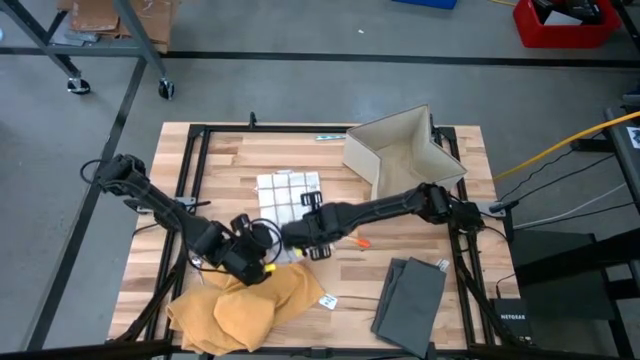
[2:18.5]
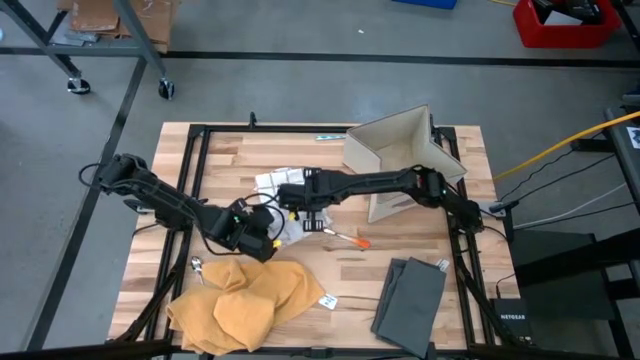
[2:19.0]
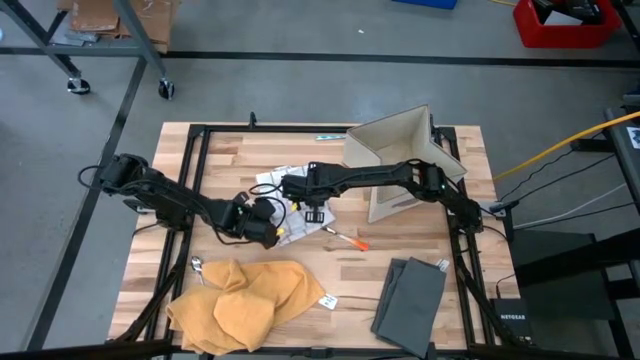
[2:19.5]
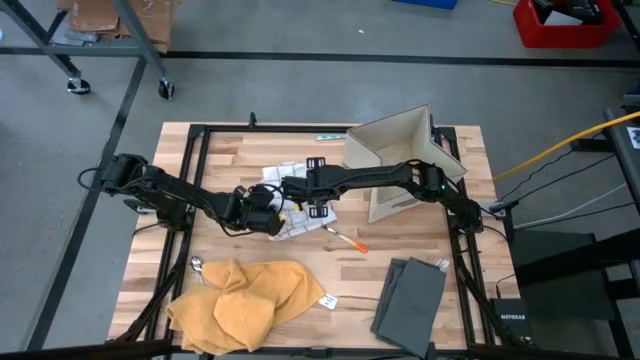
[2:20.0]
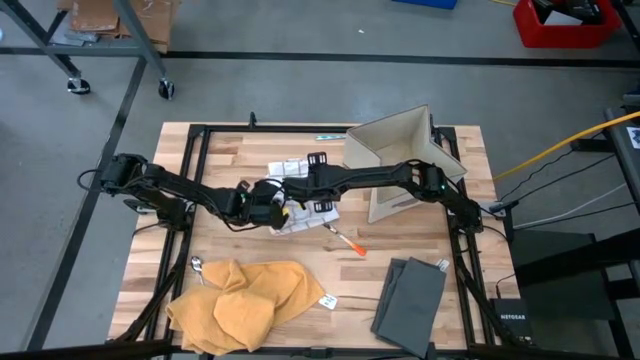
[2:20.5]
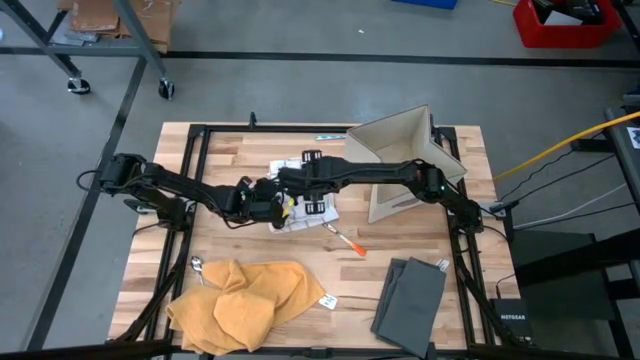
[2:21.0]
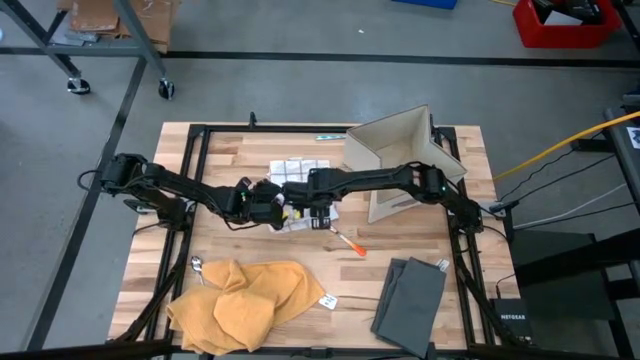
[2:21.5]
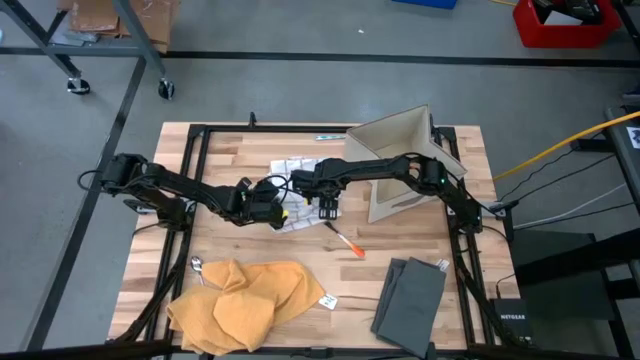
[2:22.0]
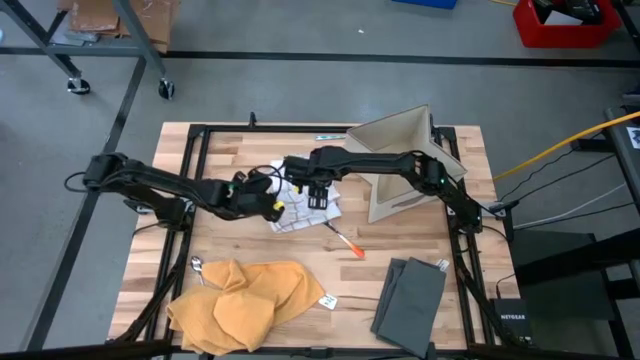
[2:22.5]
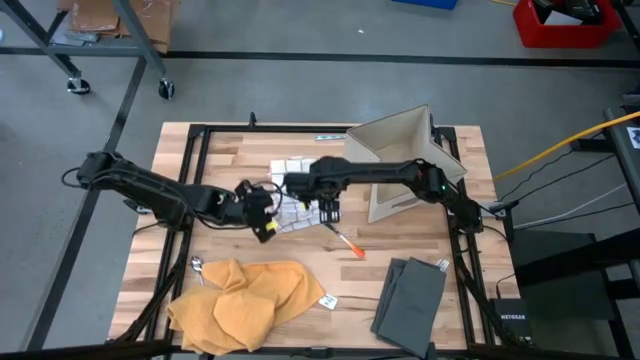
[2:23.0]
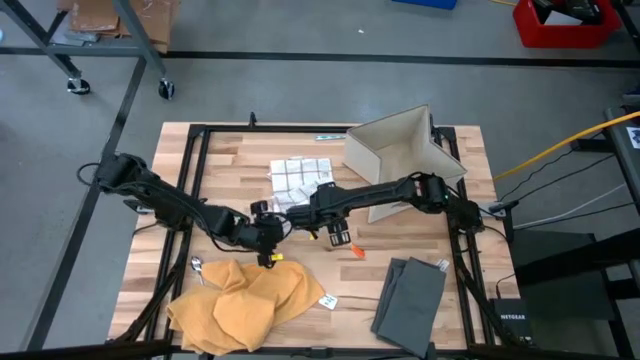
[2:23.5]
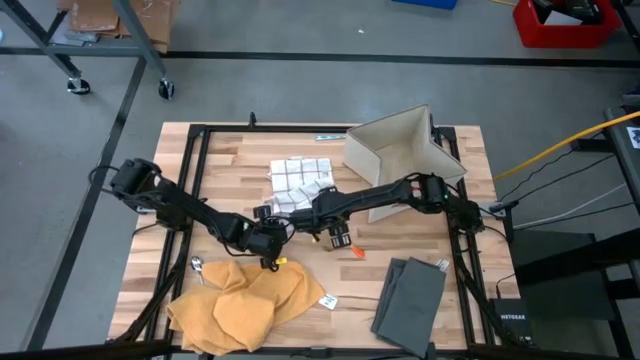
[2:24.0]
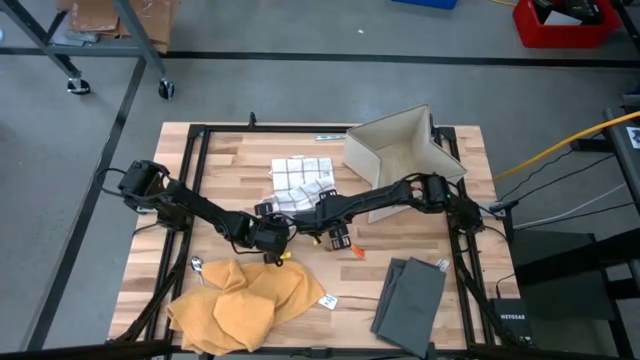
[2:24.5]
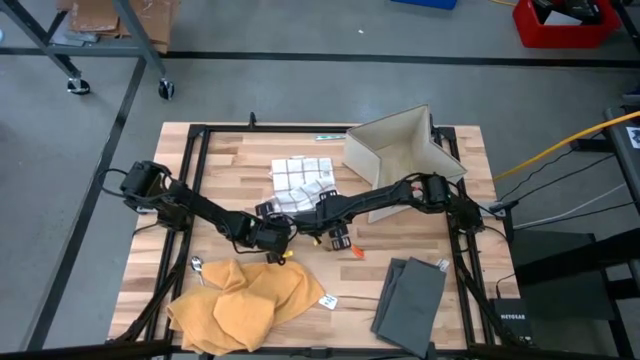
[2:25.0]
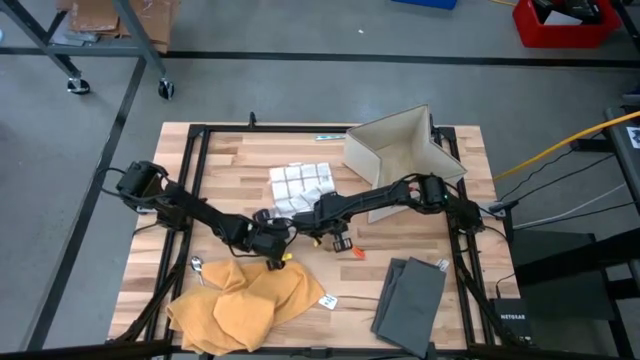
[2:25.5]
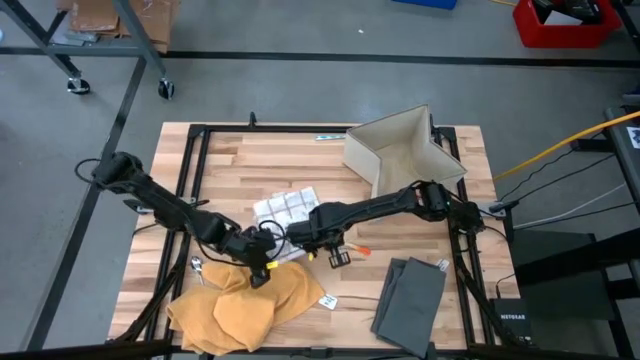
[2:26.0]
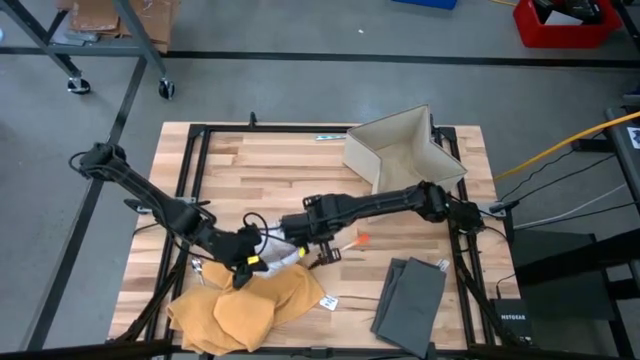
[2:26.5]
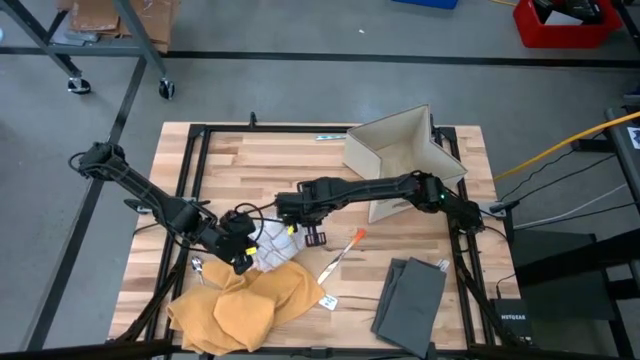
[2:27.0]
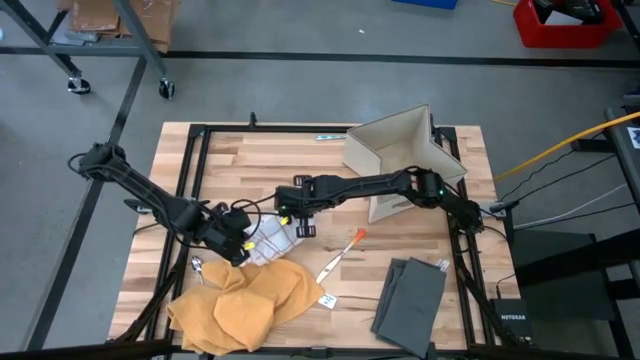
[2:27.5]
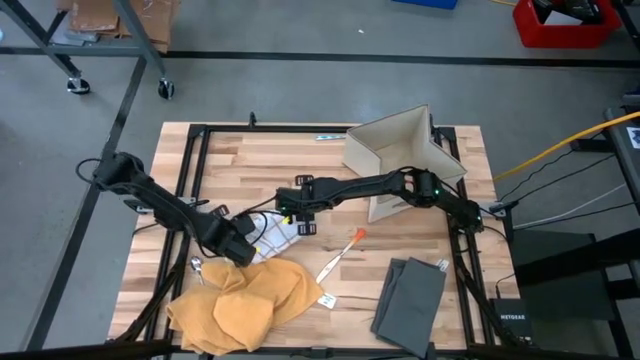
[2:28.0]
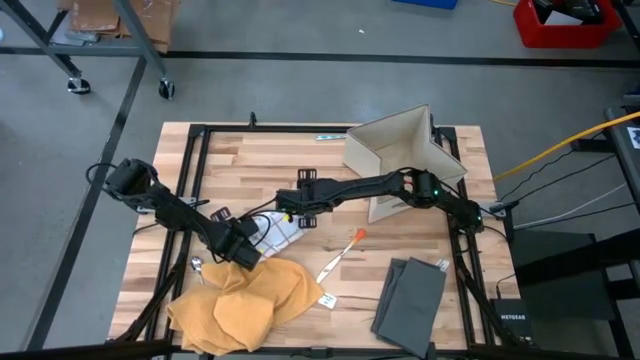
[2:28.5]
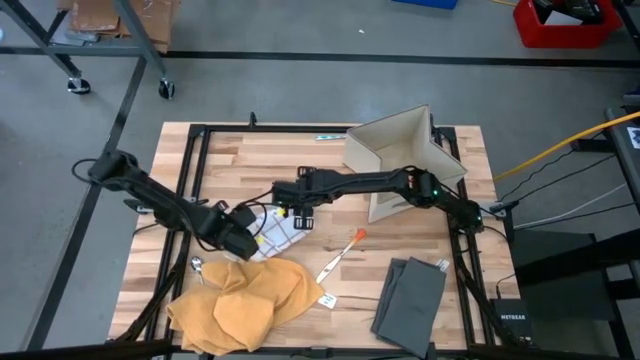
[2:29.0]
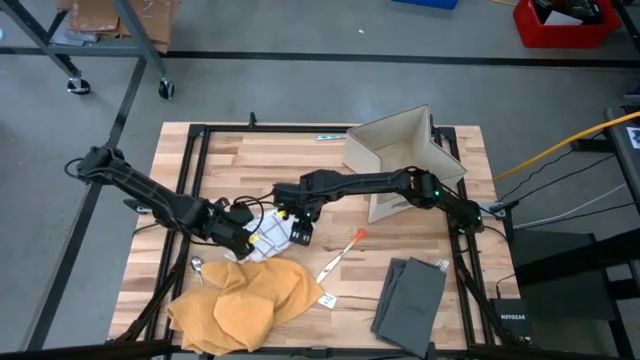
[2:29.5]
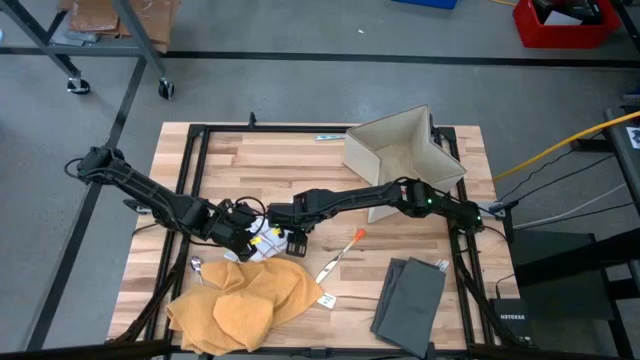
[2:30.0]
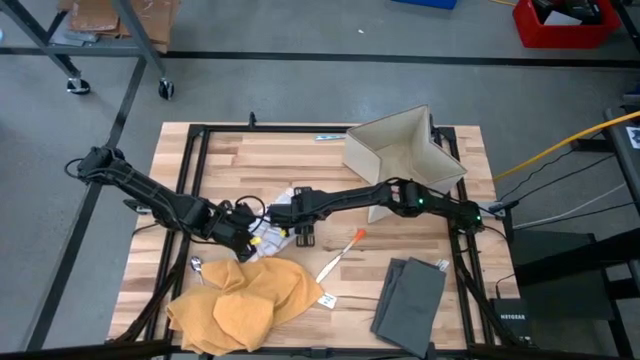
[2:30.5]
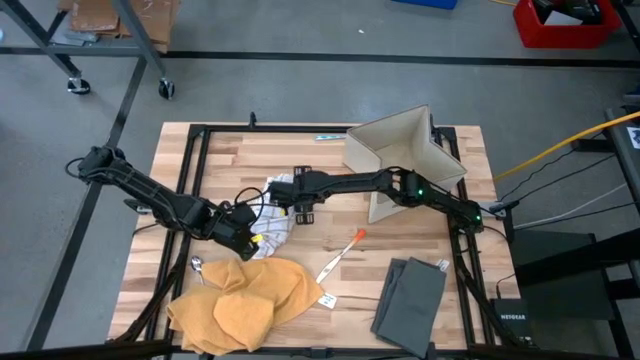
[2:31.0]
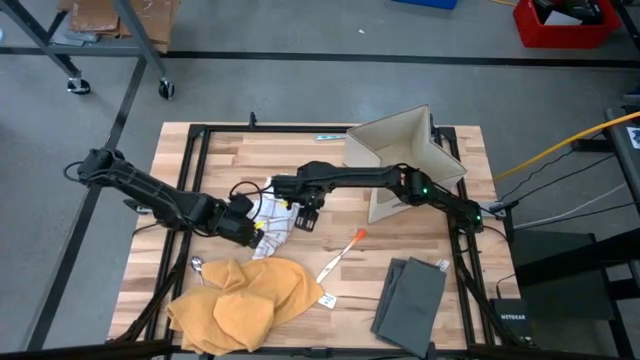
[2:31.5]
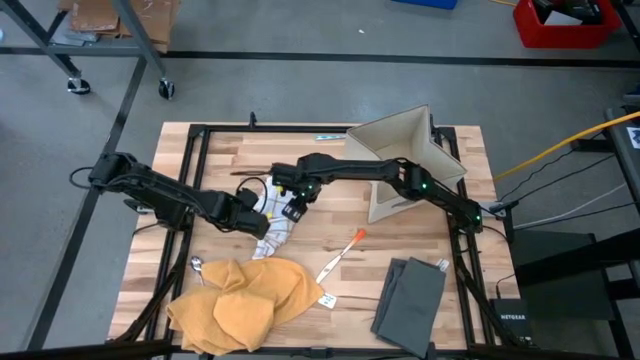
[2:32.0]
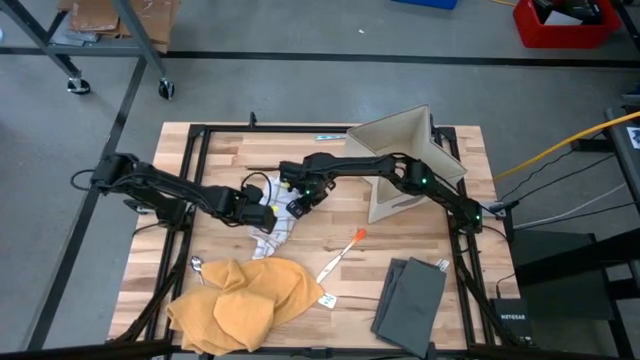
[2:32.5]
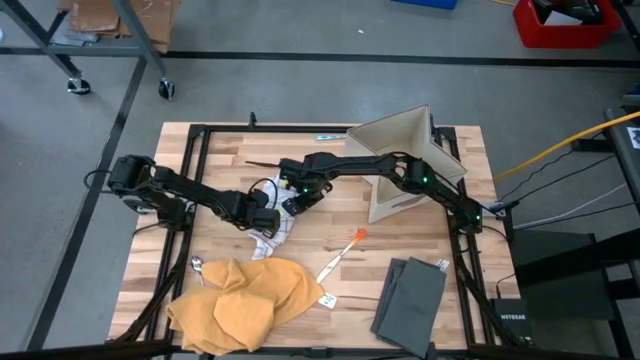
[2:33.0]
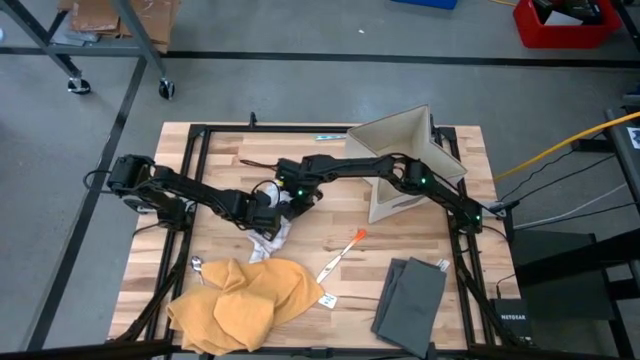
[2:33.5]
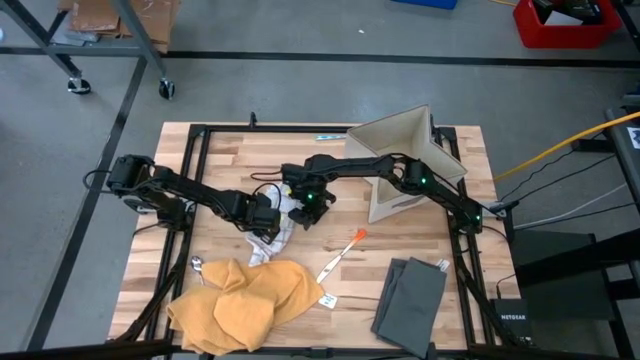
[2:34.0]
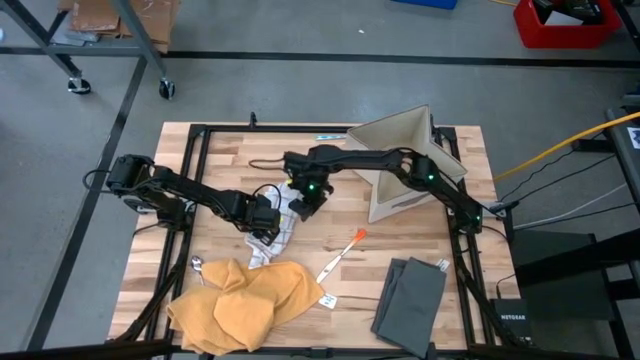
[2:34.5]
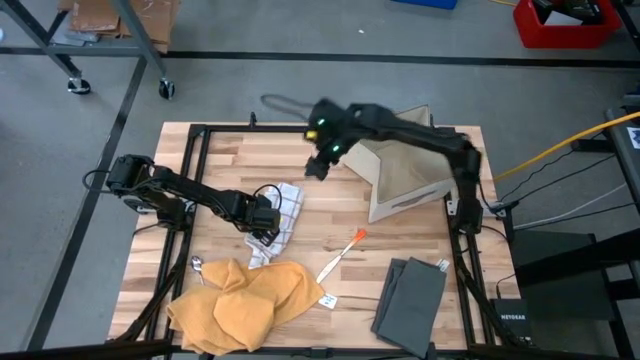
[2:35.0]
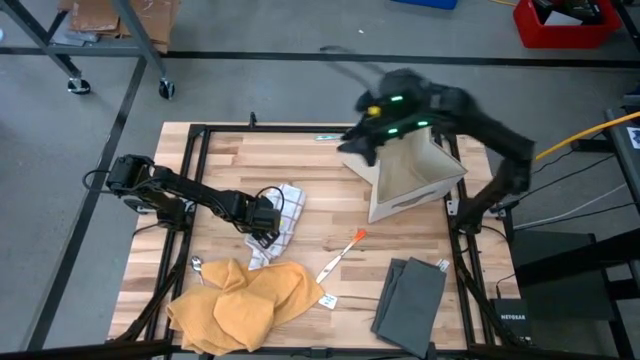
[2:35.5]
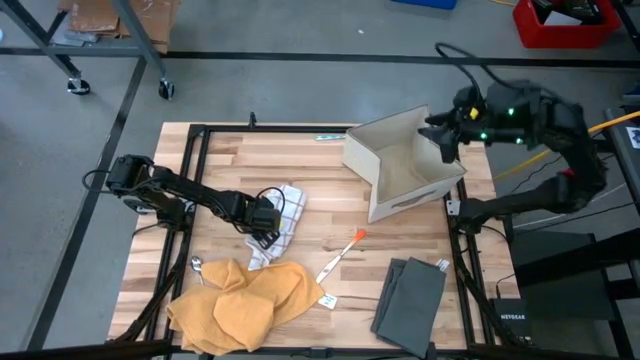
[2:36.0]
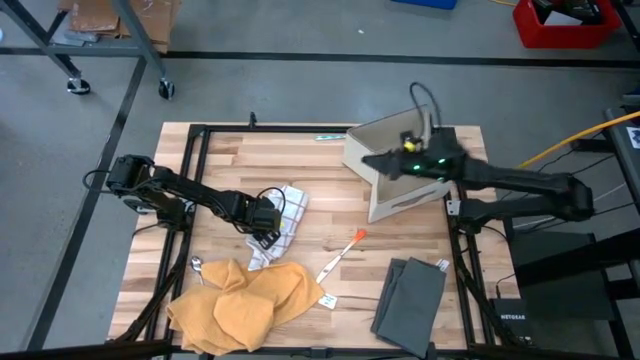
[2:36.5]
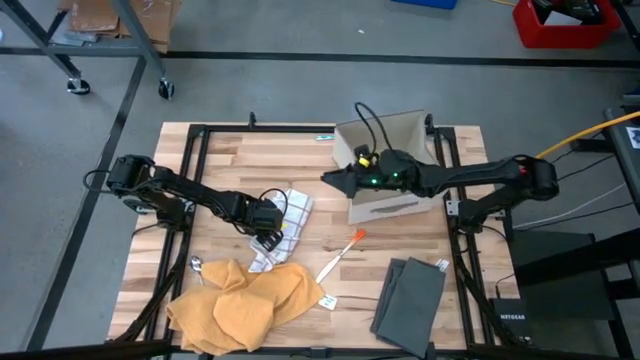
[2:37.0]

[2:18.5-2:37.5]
Task: Fold towel
Fold the white kitchen towel
